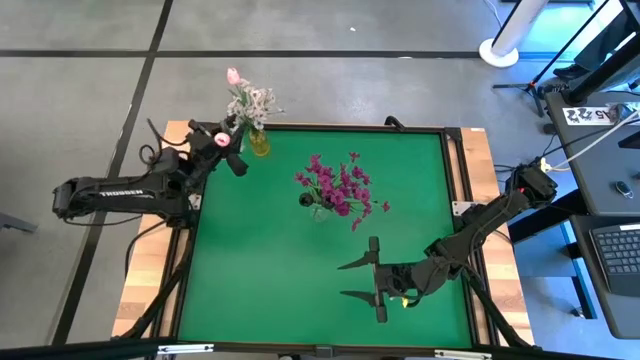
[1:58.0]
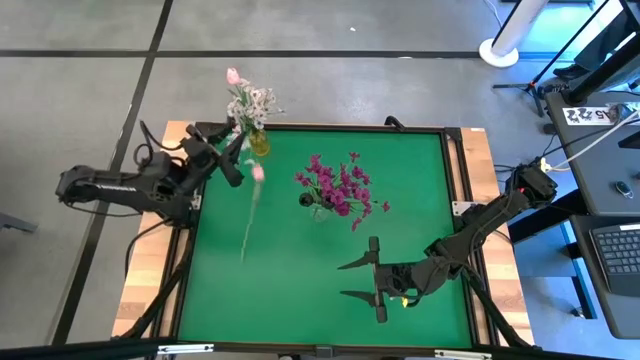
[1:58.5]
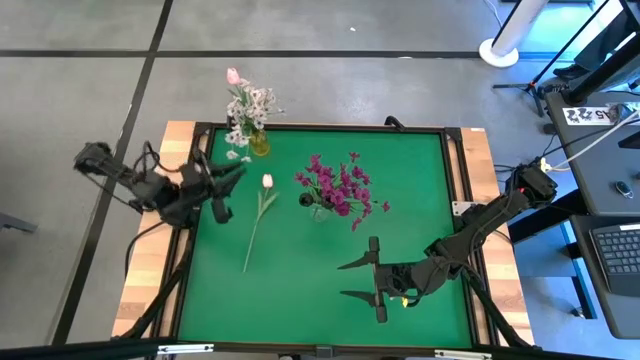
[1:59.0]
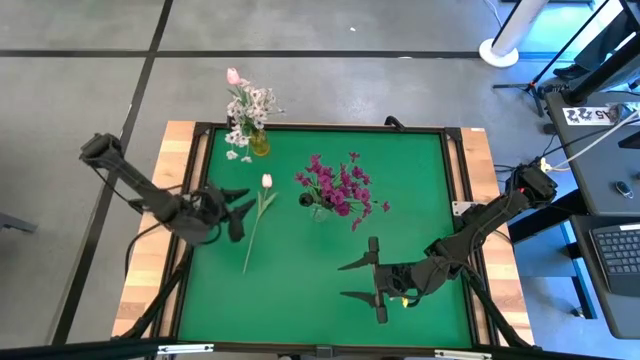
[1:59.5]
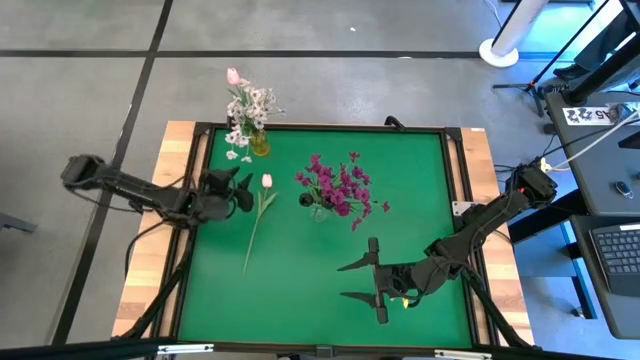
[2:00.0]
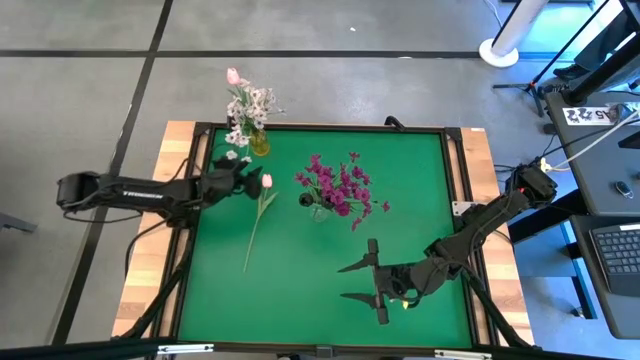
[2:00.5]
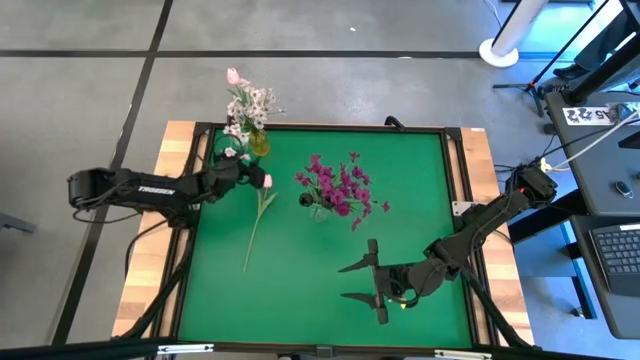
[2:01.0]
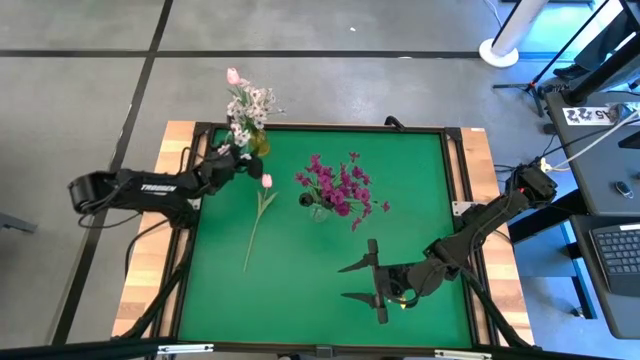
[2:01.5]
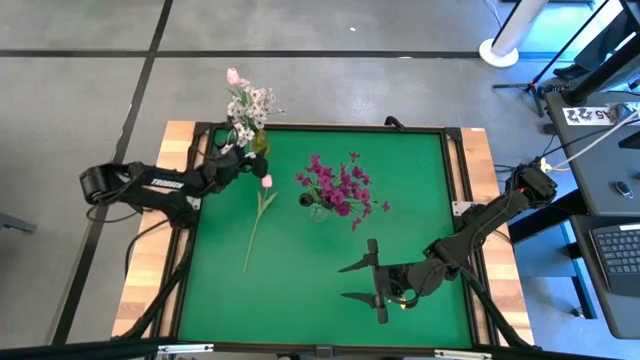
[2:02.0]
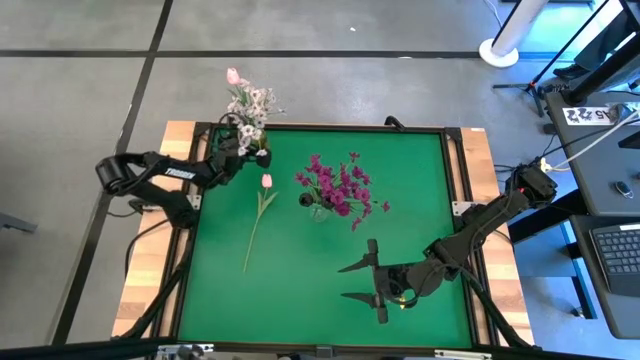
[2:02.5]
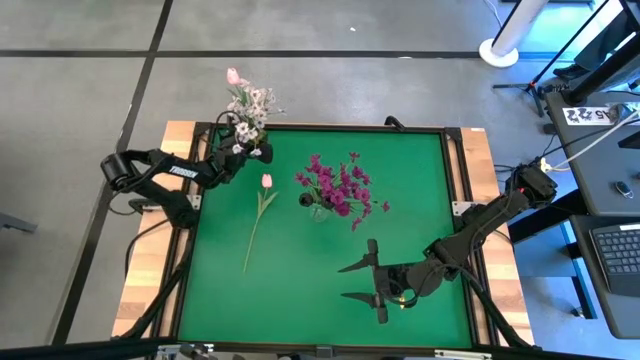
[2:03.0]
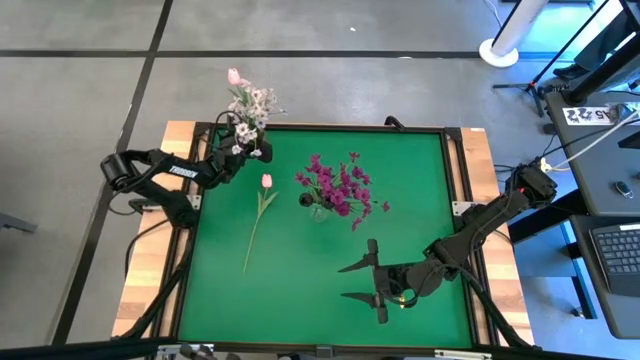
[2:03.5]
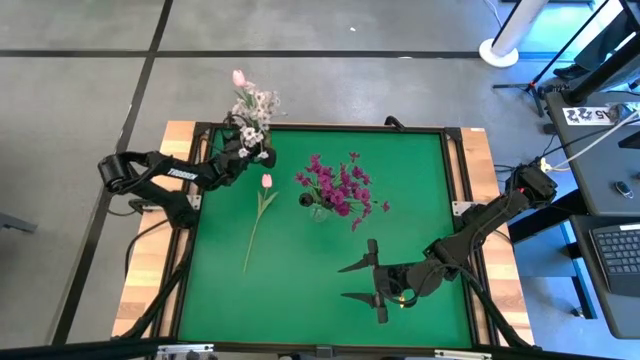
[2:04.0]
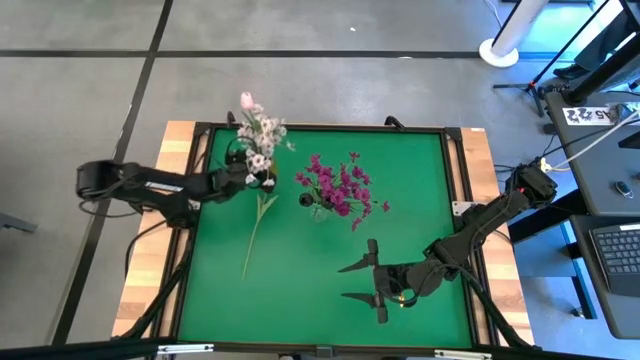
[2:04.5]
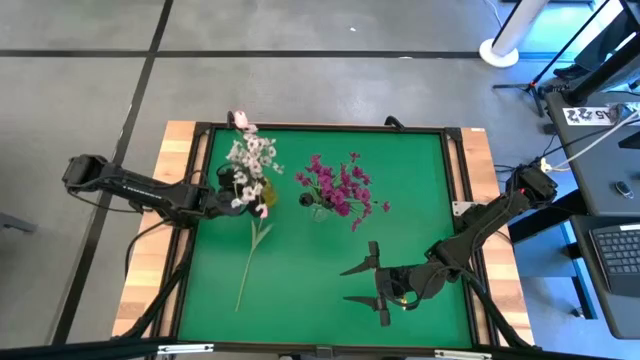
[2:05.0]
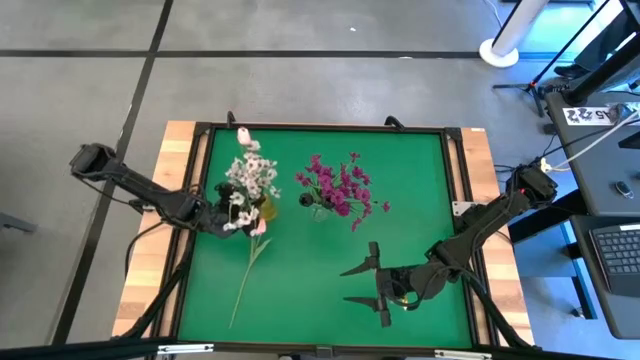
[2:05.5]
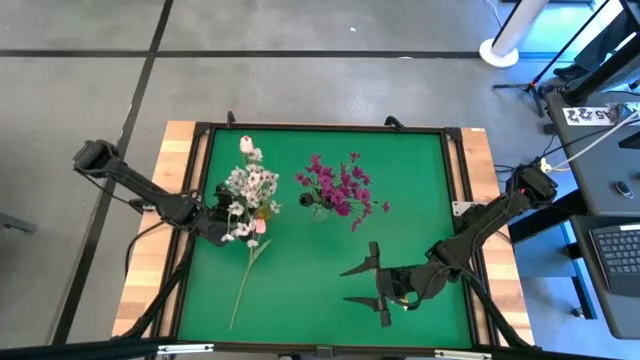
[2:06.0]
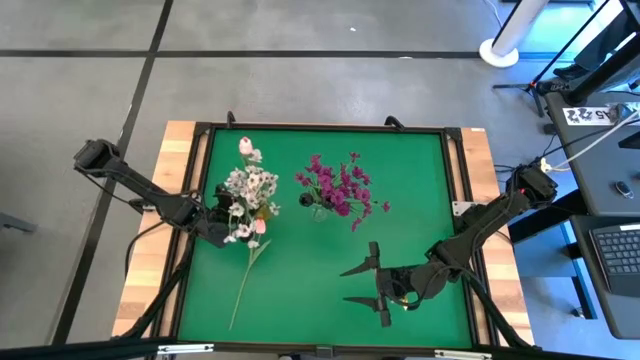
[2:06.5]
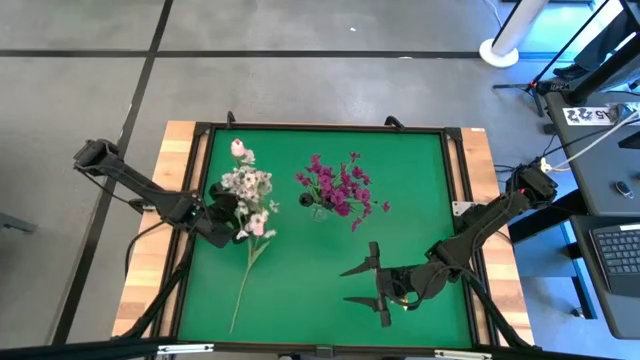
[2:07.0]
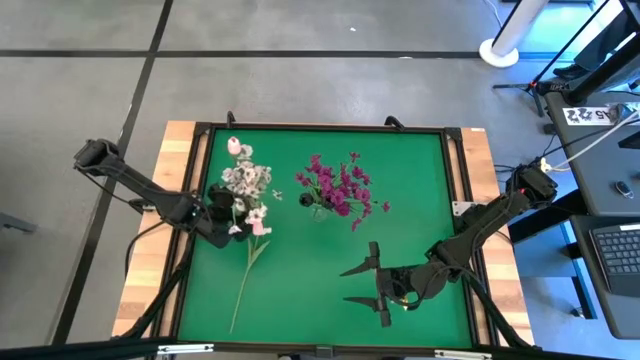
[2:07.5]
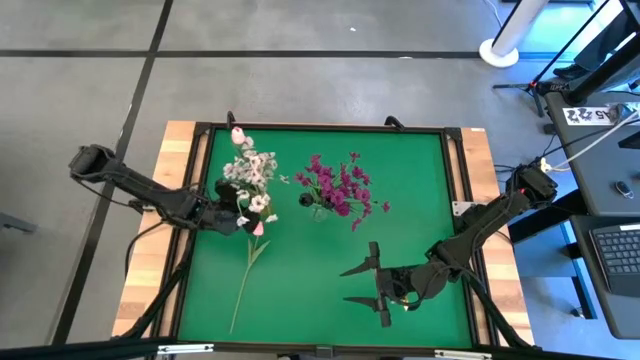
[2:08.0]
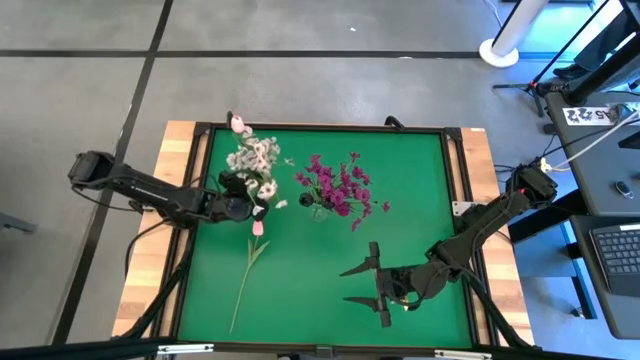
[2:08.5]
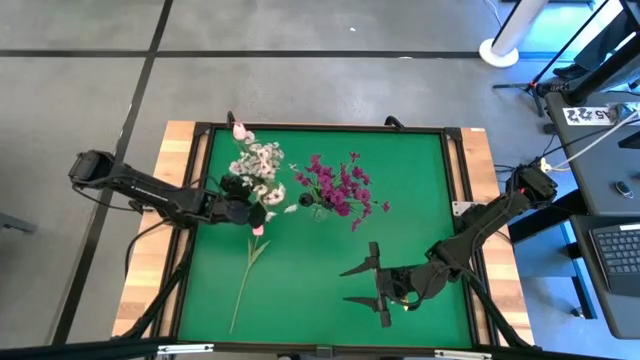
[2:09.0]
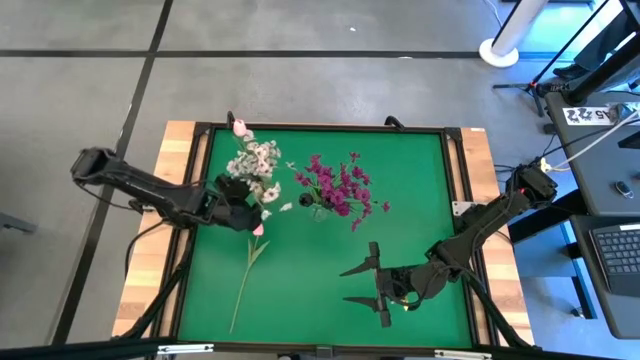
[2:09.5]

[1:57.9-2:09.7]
Task: Sort flowers into vase by color
Move the yellow vase to the middle left of the table

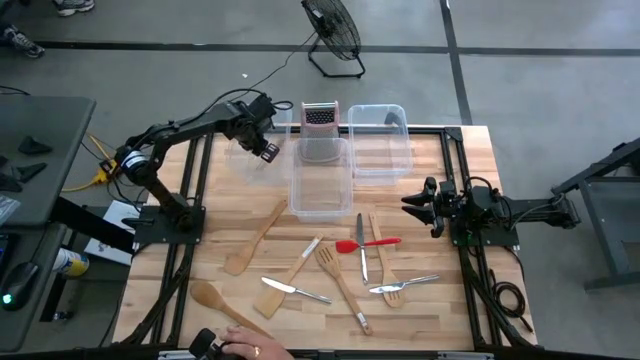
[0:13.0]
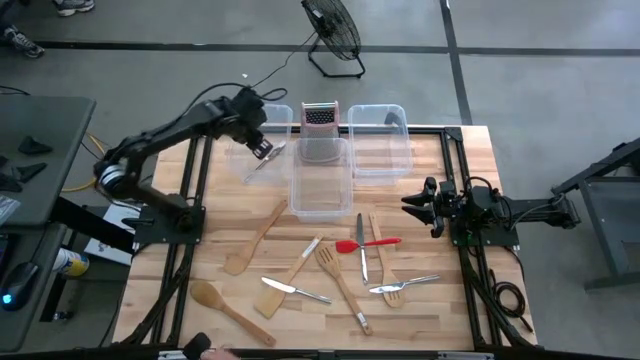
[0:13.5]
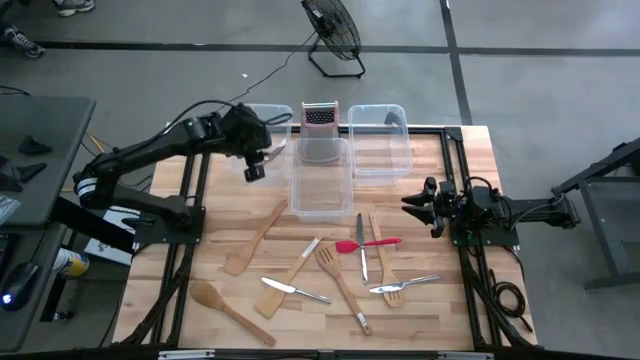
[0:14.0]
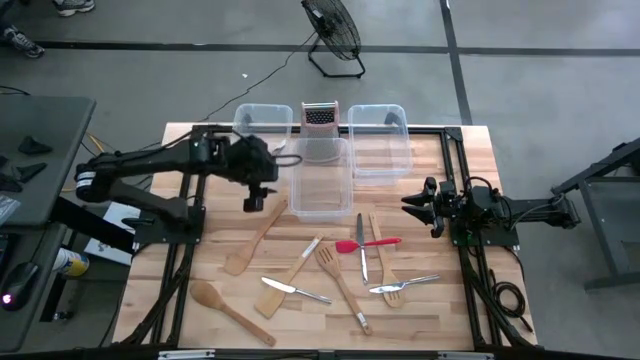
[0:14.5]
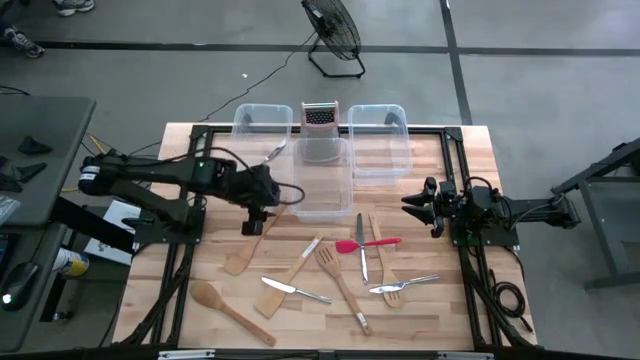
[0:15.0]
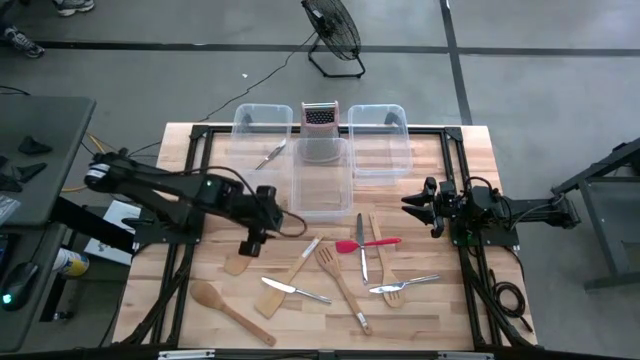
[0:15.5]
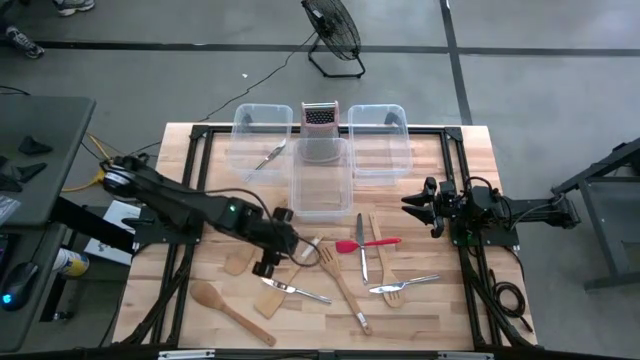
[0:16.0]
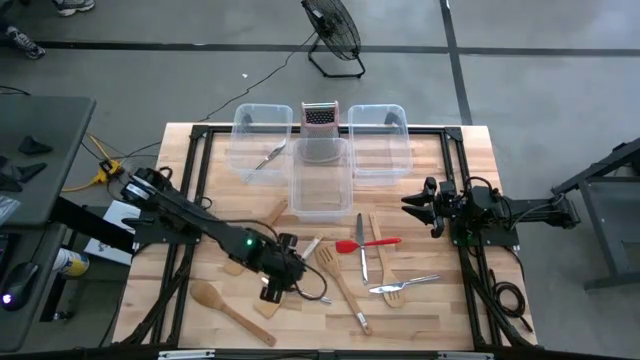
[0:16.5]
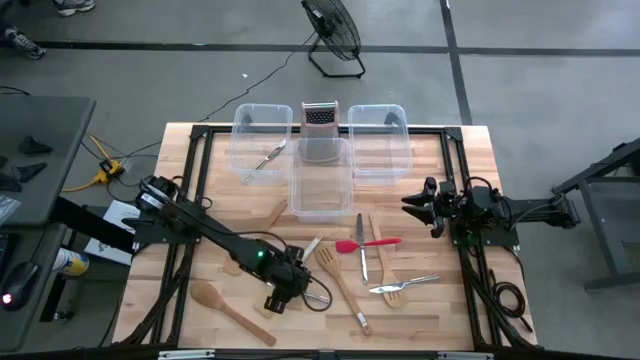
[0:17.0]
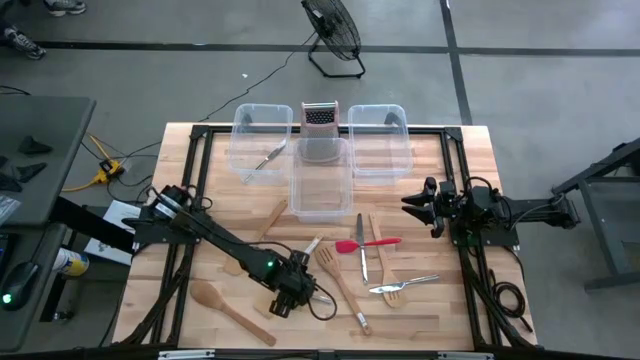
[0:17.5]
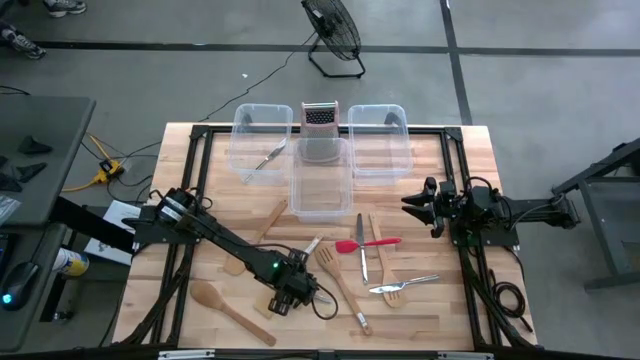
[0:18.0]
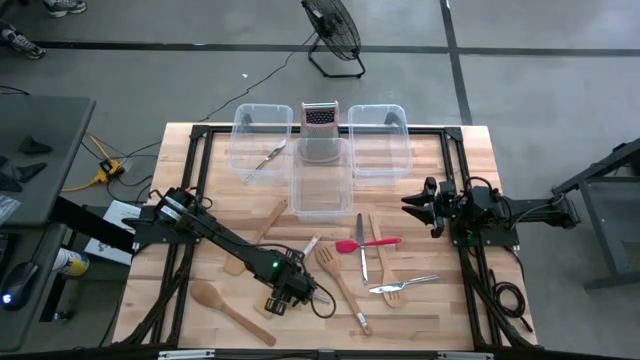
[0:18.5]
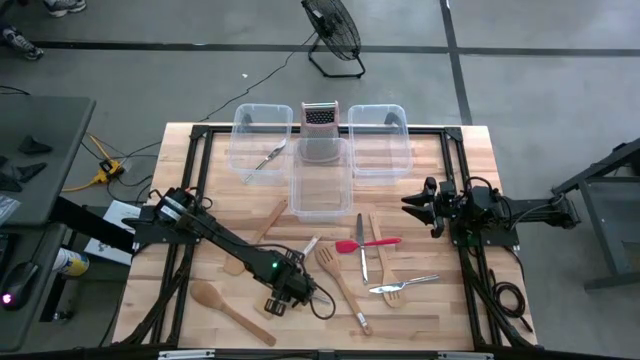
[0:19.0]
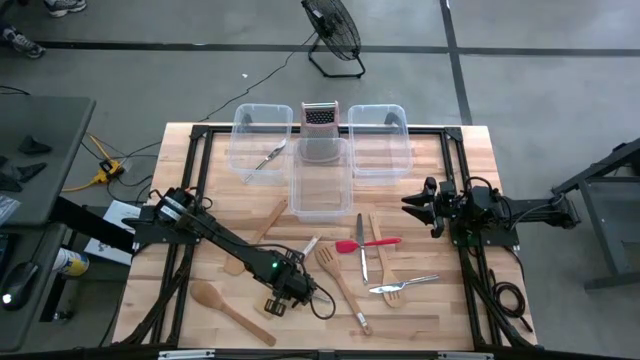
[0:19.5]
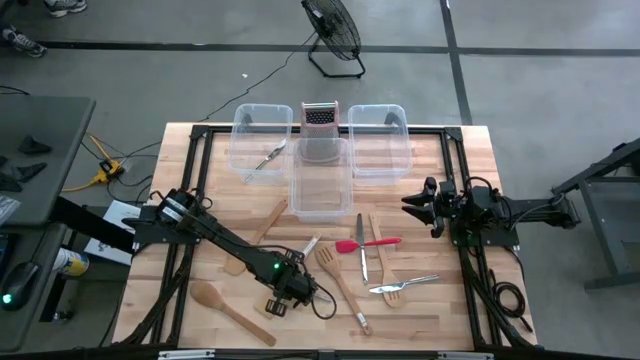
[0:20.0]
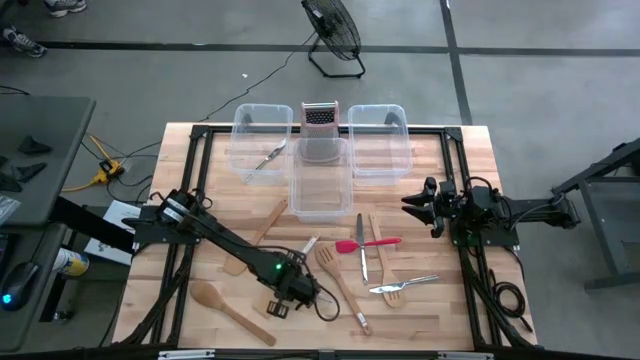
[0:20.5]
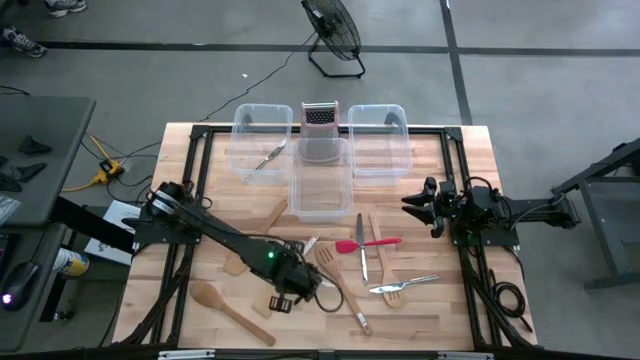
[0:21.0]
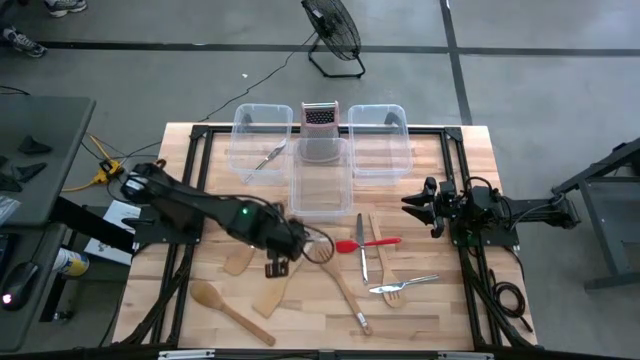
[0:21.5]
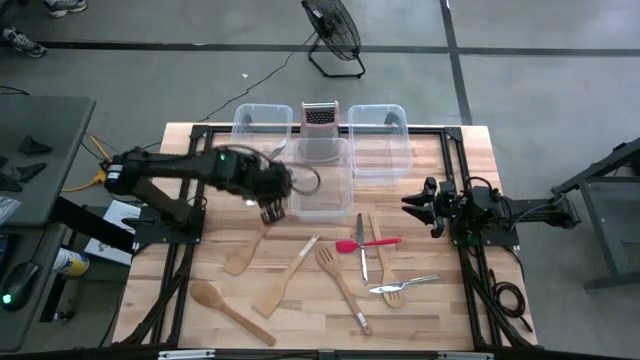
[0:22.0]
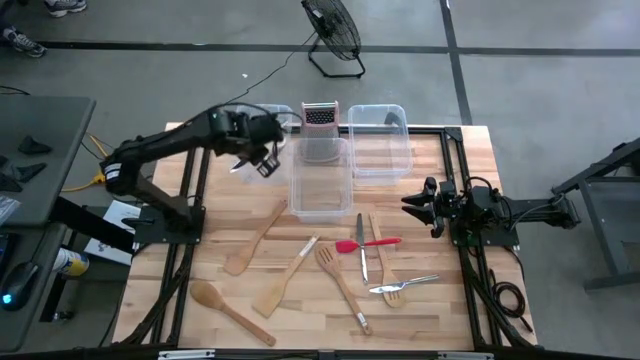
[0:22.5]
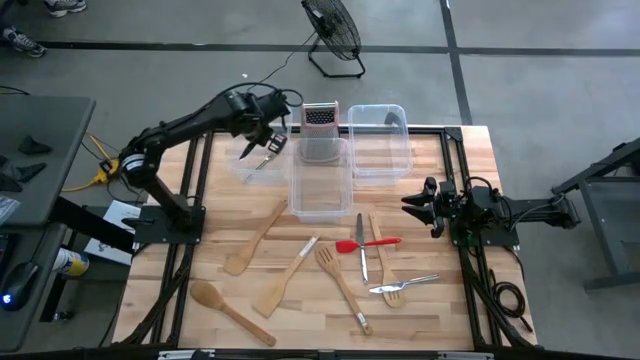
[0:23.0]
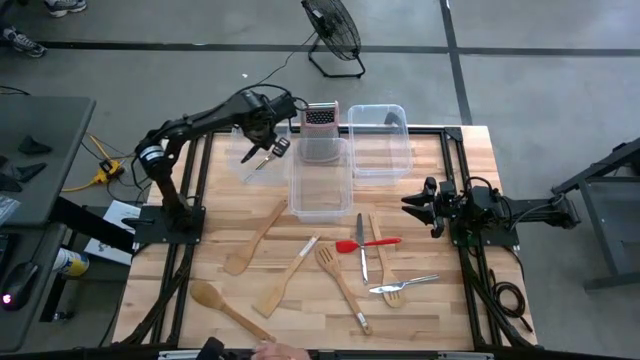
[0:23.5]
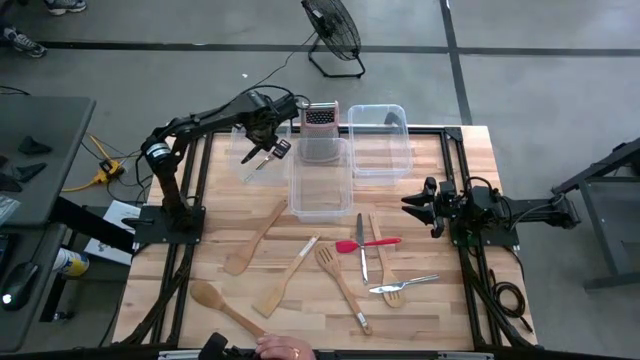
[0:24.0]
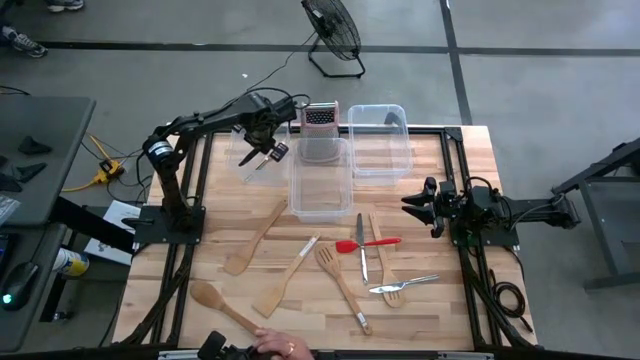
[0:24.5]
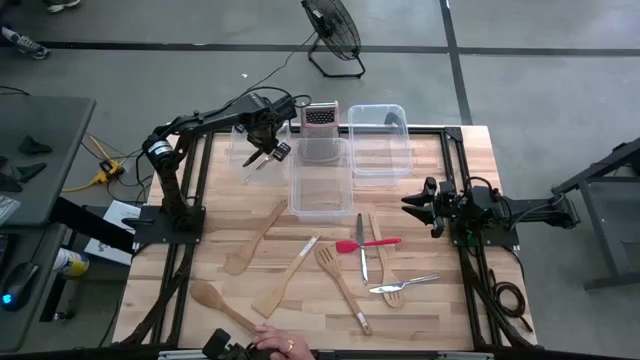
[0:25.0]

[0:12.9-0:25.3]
Task: Pick & Place Kitchen Items
Put the silver knife into the left transparent bin
